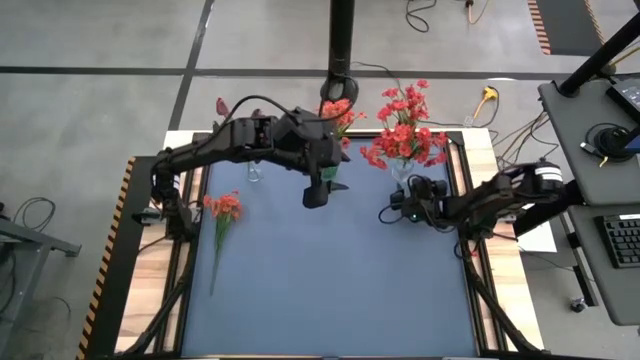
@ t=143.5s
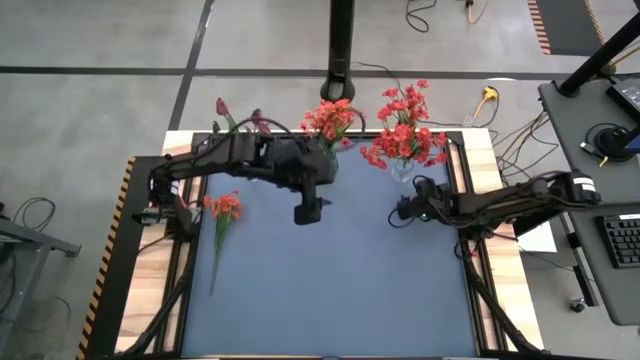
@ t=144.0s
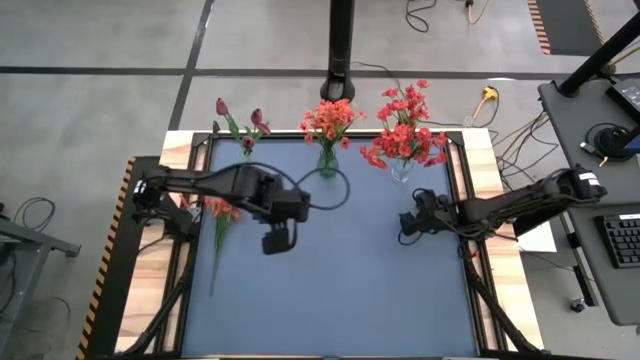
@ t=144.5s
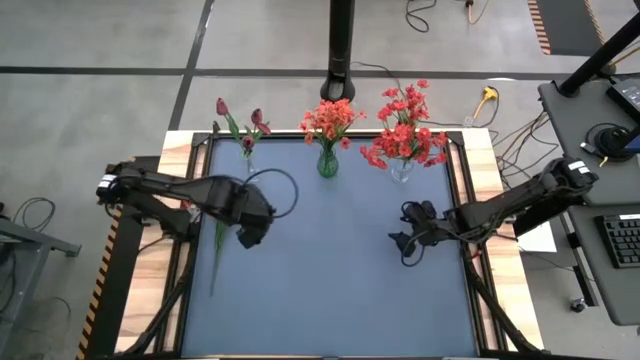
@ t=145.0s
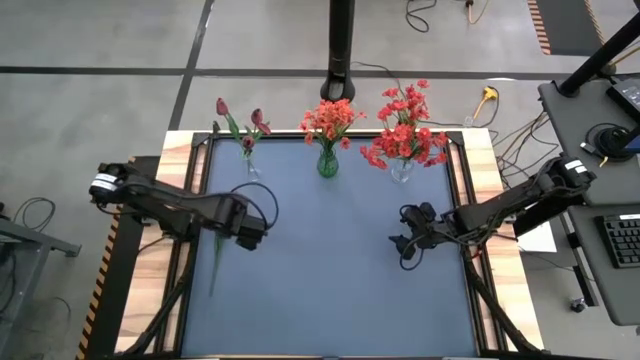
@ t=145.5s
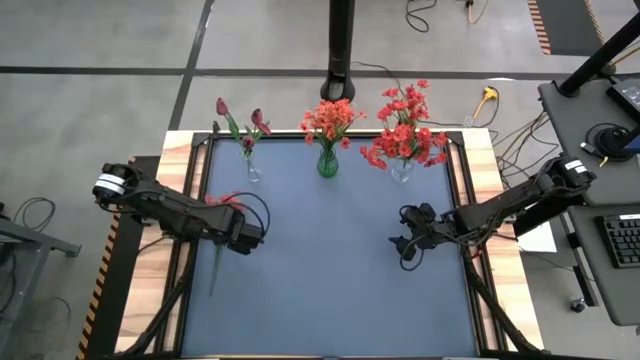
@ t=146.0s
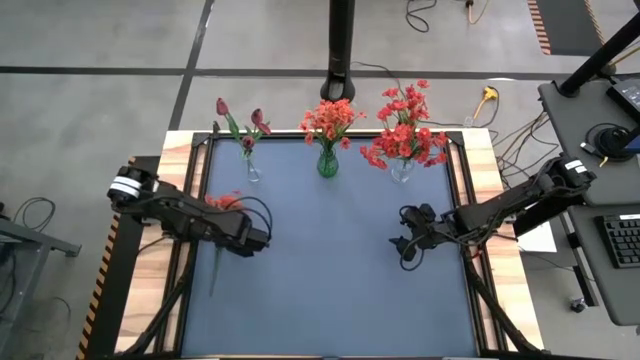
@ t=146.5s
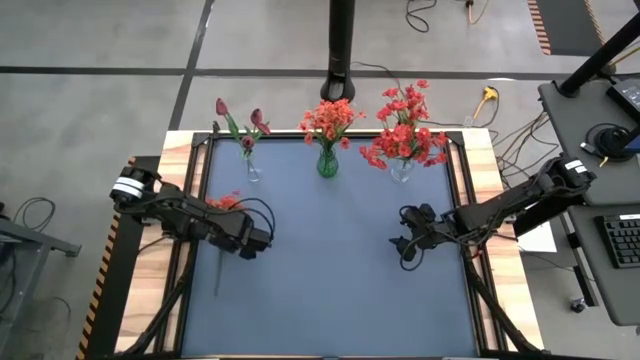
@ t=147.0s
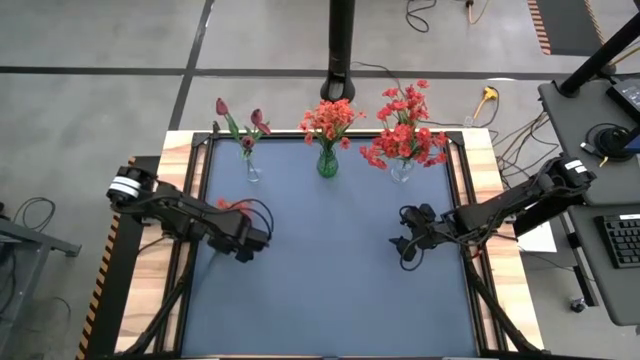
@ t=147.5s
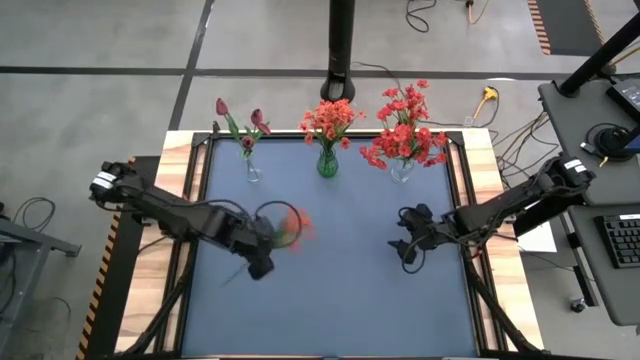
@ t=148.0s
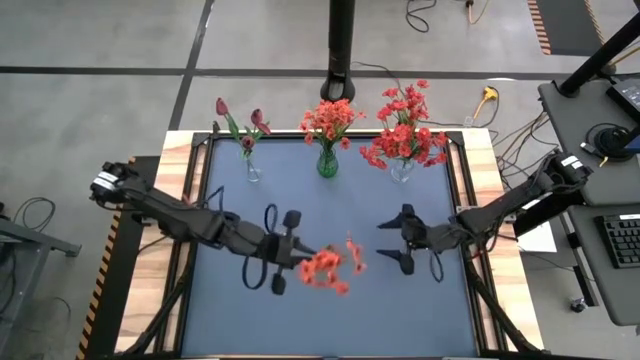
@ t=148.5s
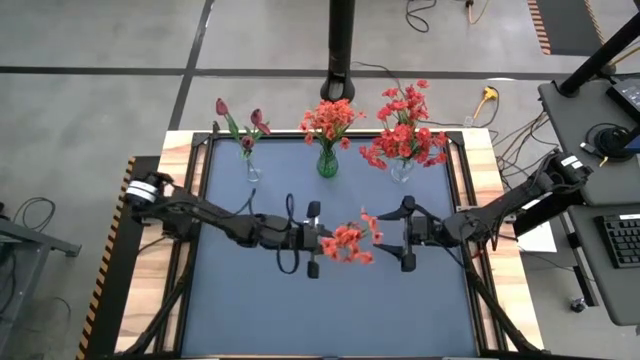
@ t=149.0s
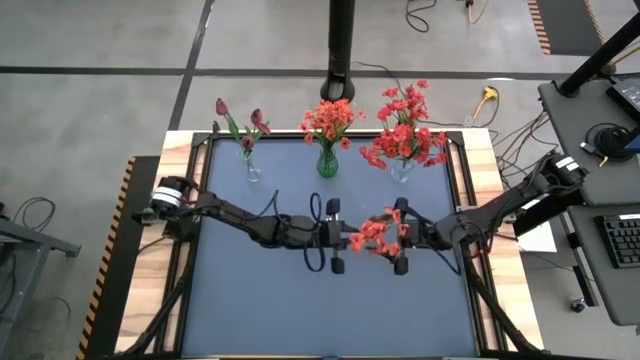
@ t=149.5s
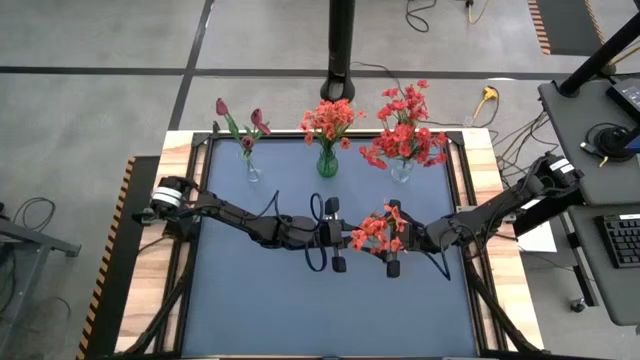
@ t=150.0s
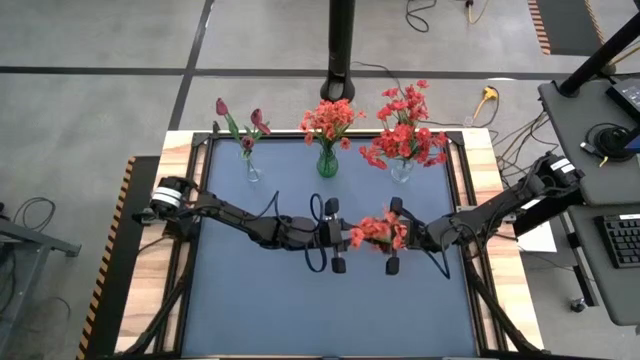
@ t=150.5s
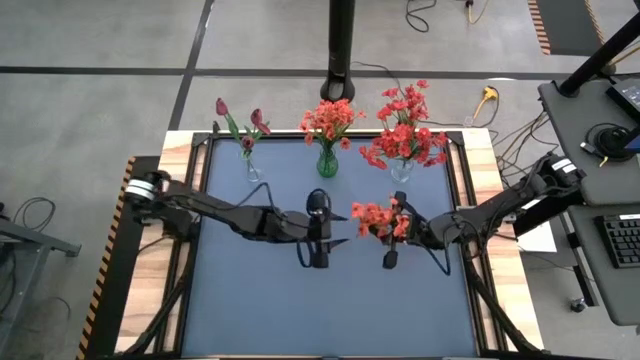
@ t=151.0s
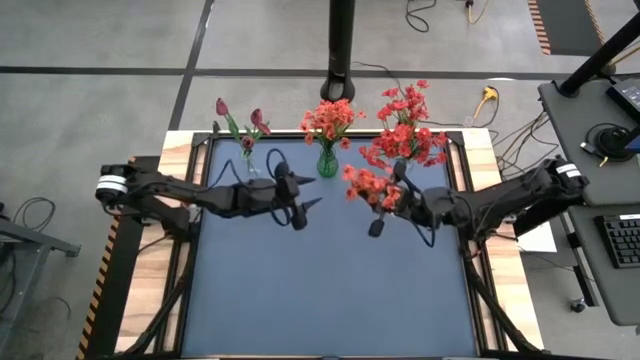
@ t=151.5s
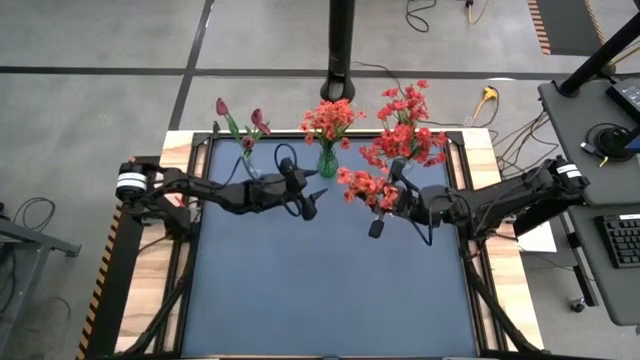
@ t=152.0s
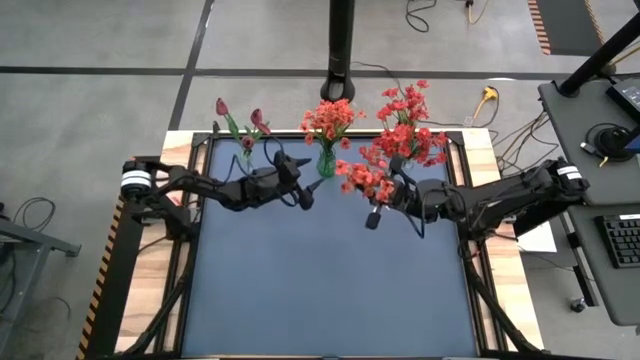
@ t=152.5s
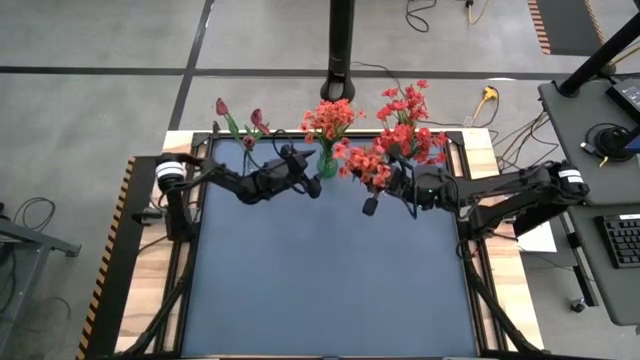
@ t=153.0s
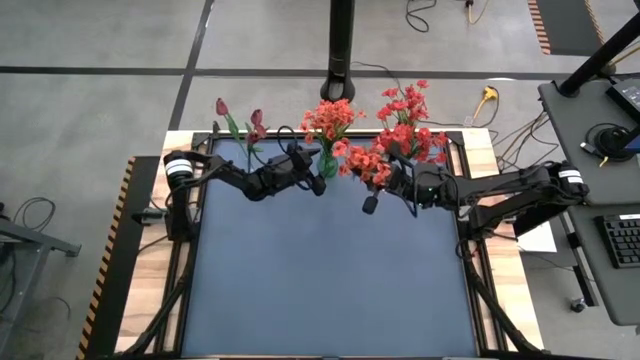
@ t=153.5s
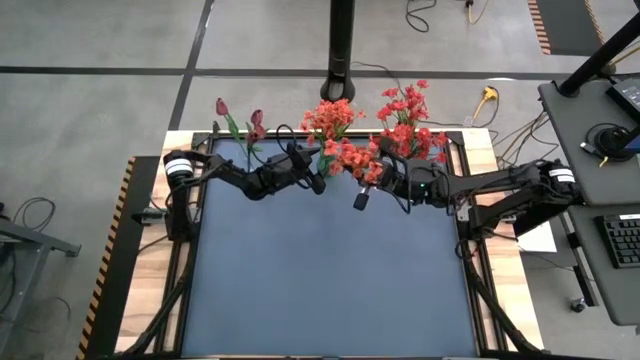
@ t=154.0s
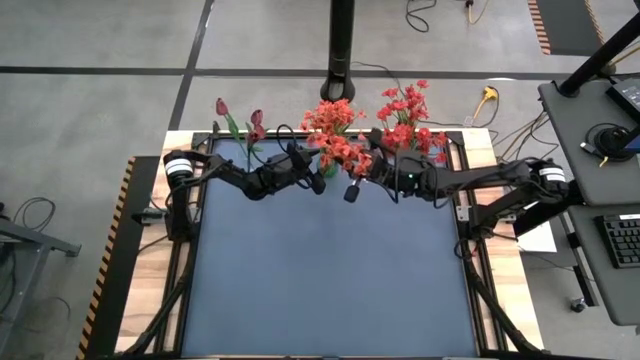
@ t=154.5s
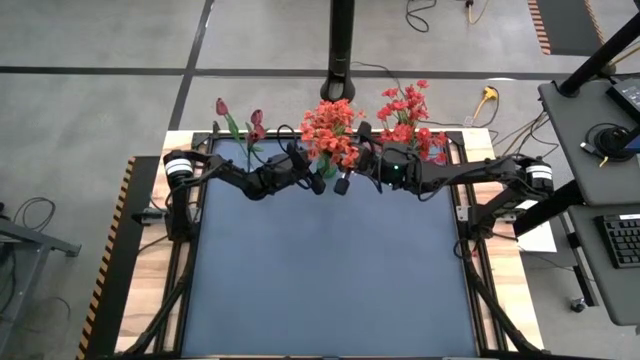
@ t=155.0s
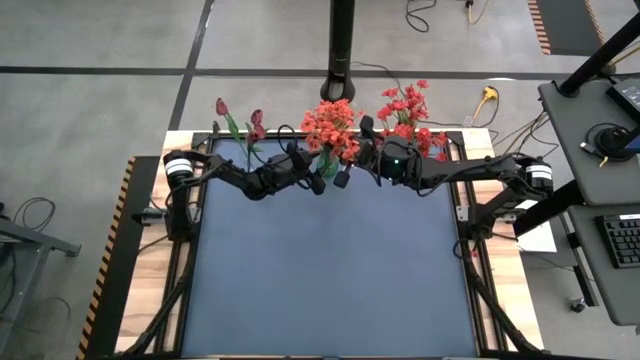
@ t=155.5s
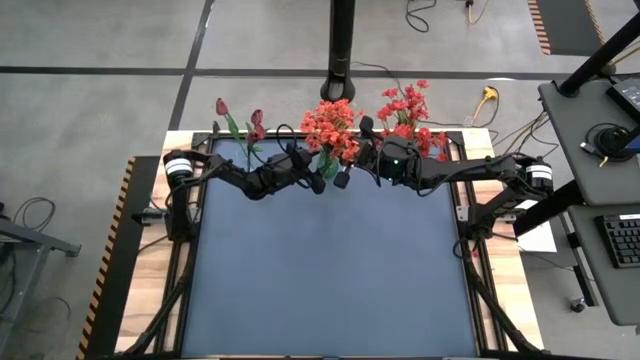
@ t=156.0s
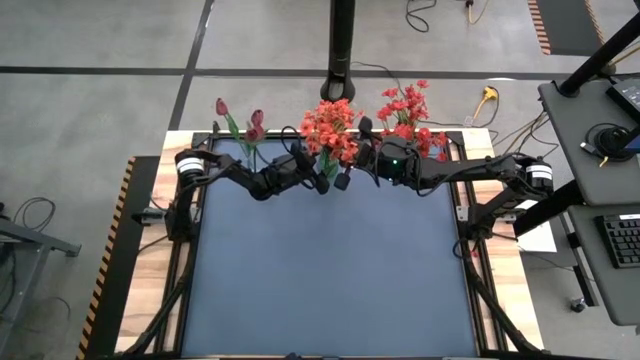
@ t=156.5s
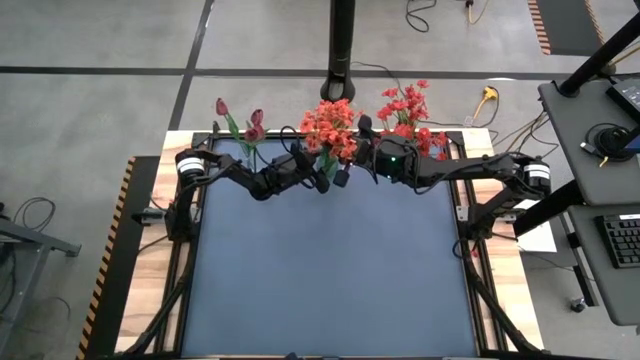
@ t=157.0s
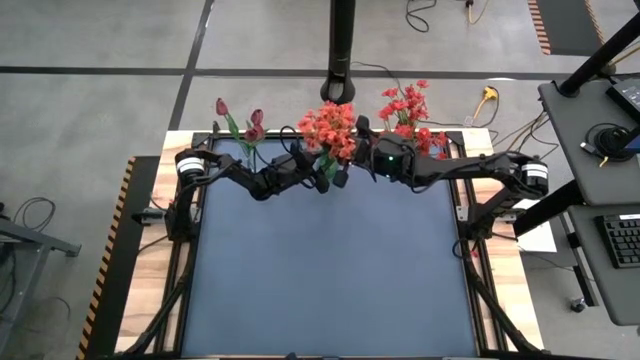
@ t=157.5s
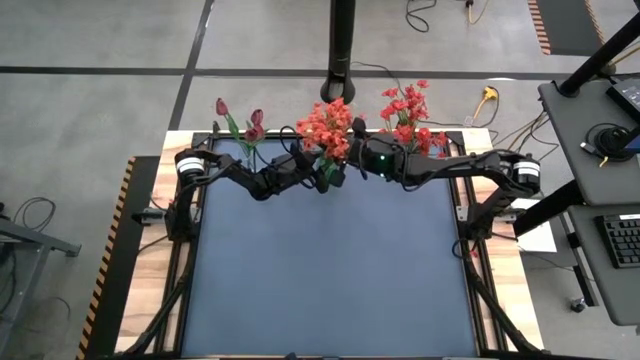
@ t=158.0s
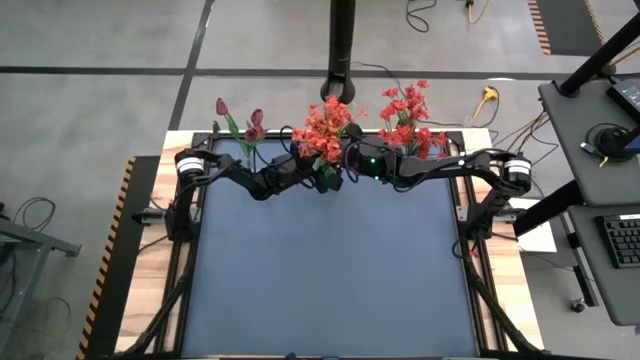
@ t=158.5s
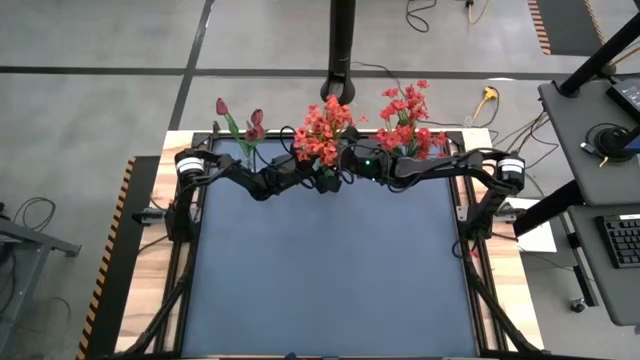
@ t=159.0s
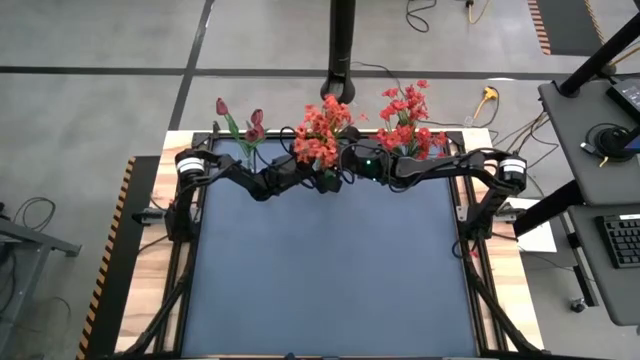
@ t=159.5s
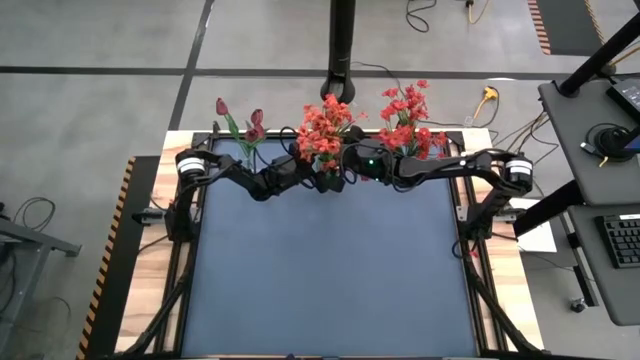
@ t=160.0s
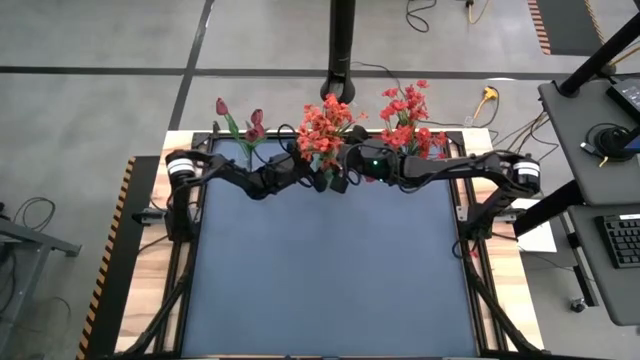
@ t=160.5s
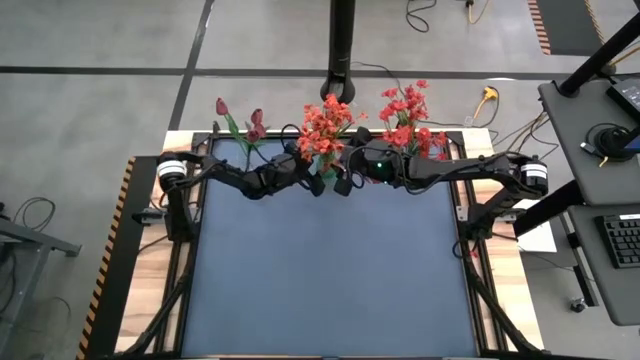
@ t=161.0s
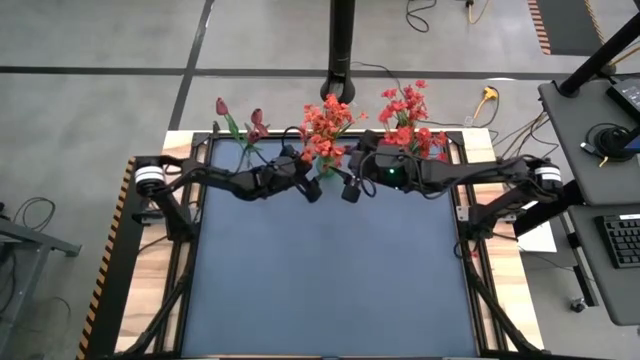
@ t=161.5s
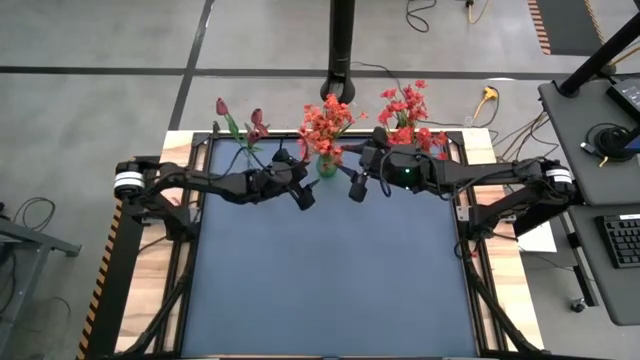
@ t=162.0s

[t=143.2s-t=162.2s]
Task: Sort flowers into vase by color
Put the orange flowers into the green vase

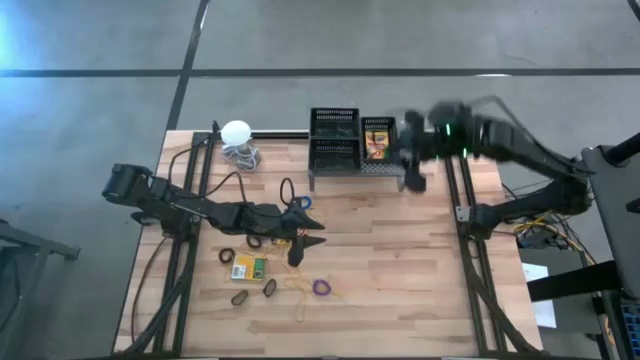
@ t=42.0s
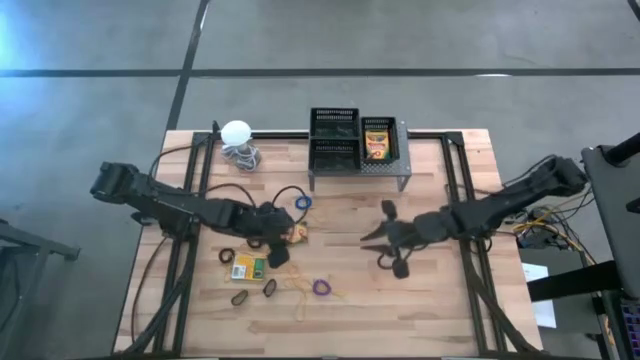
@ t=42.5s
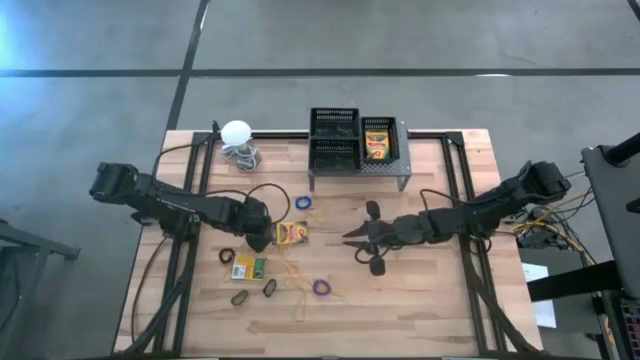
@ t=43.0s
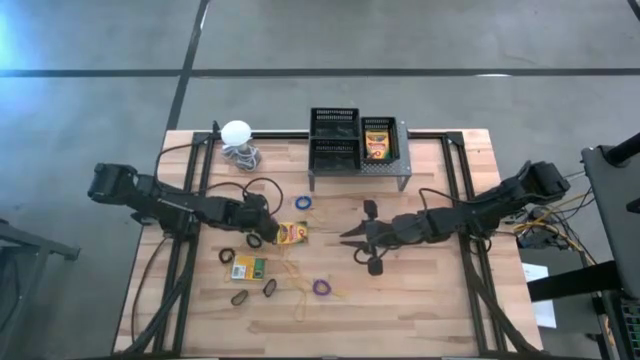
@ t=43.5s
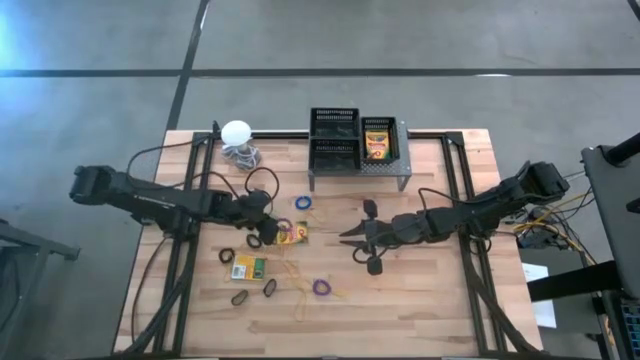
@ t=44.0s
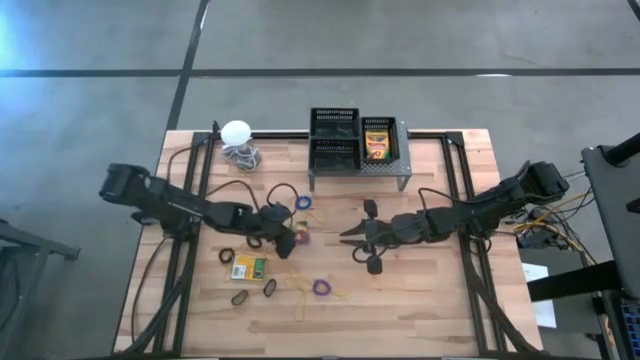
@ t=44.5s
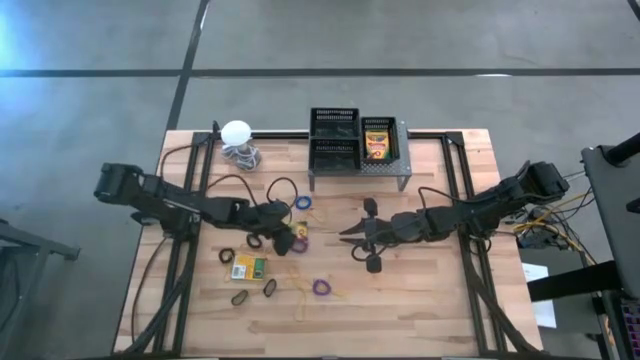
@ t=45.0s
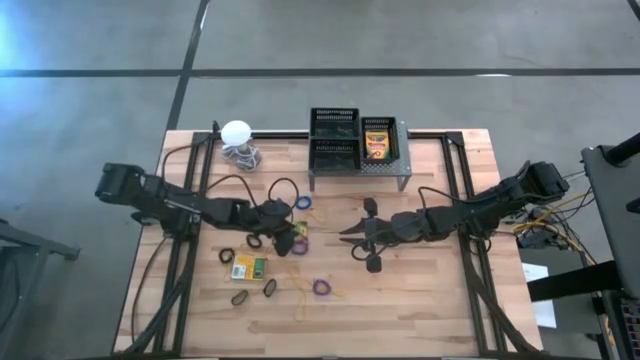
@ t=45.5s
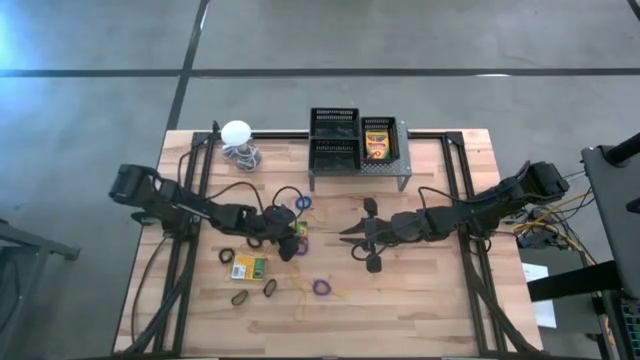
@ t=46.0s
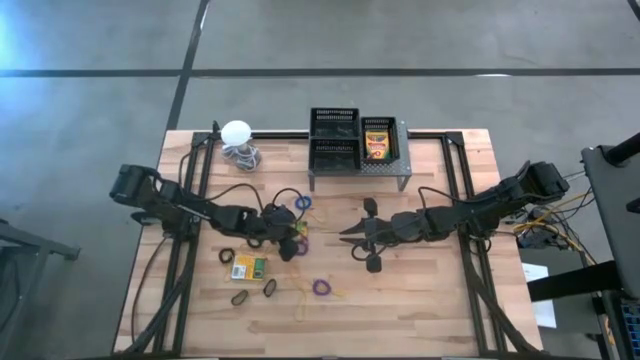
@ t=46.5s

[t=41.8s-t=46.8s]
Task: Pick & Place Office Desk Supplies
Put the green spring keychain into the top left black bin
